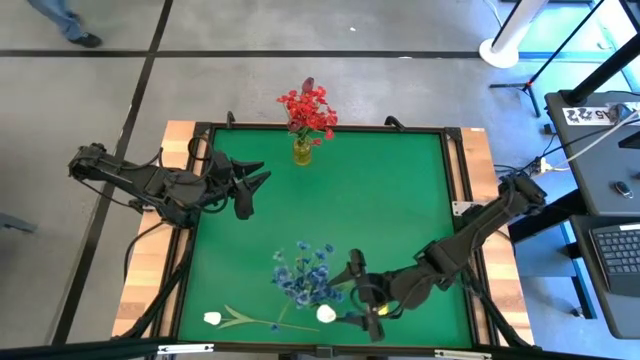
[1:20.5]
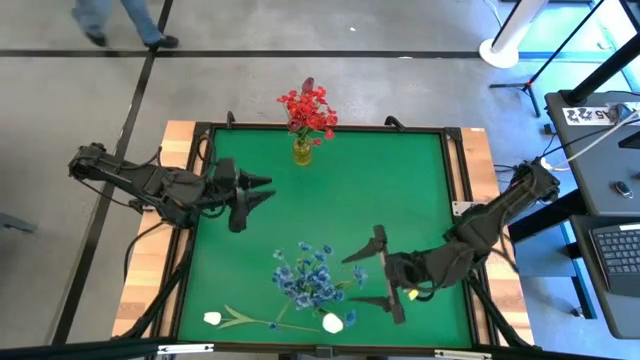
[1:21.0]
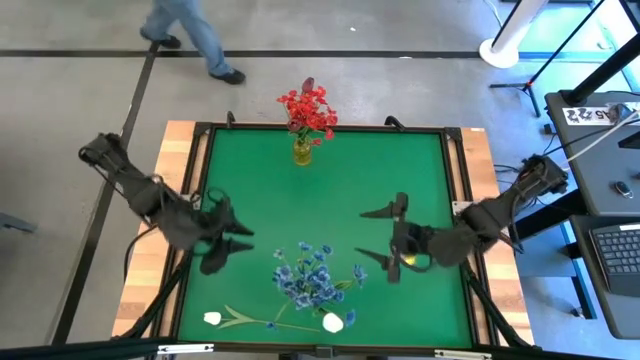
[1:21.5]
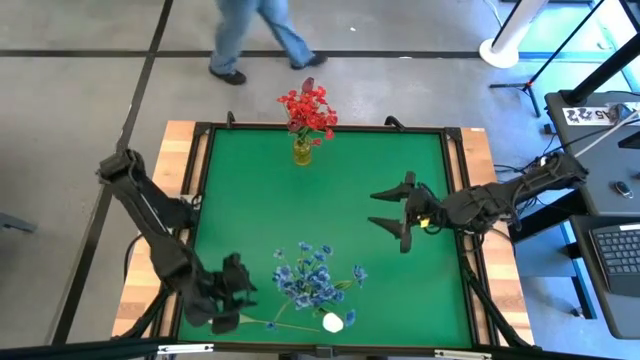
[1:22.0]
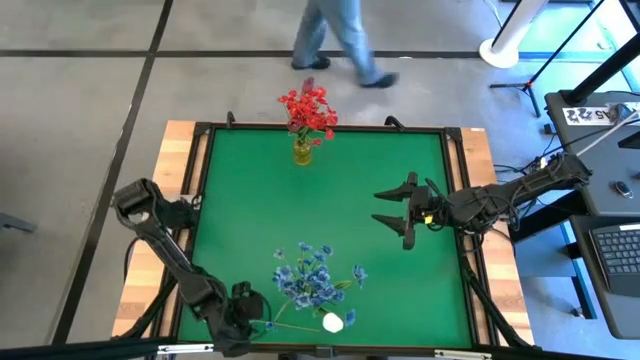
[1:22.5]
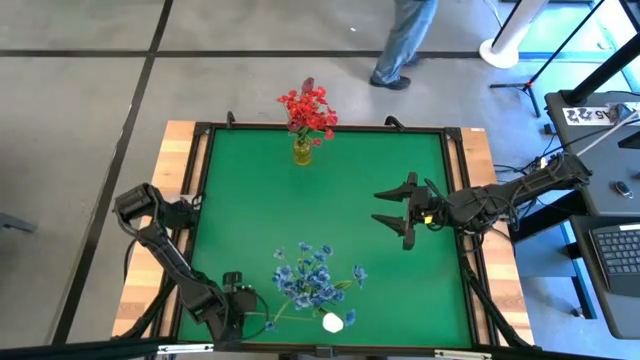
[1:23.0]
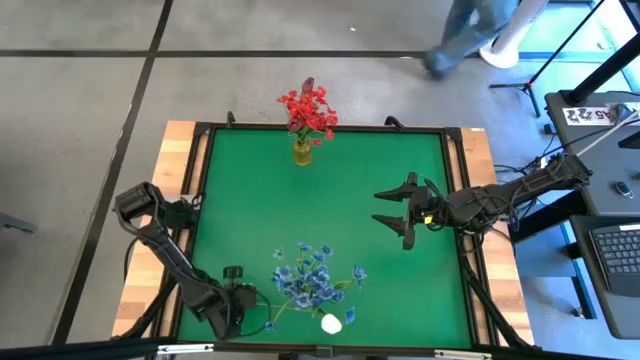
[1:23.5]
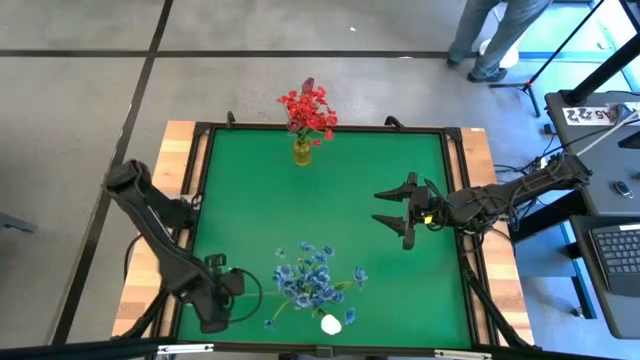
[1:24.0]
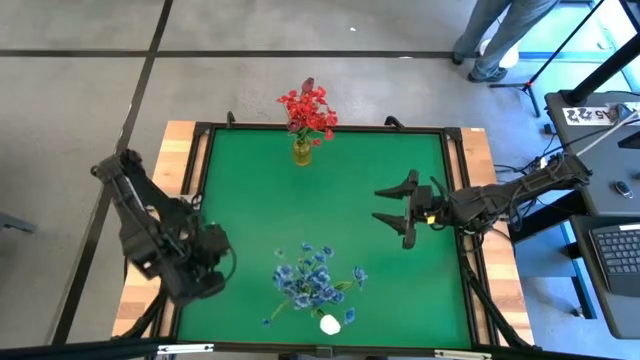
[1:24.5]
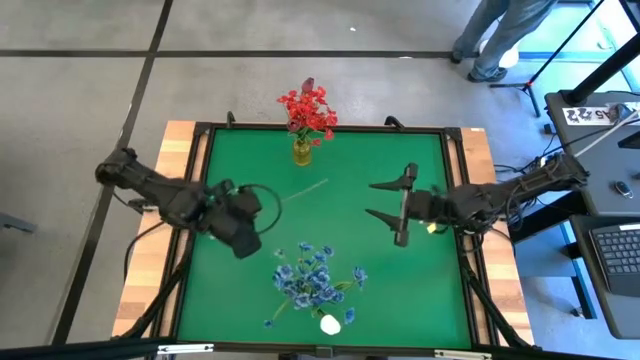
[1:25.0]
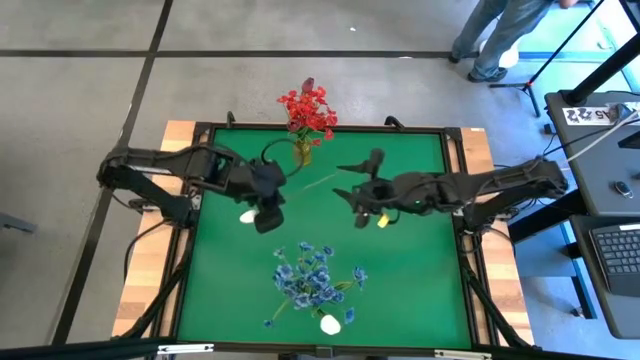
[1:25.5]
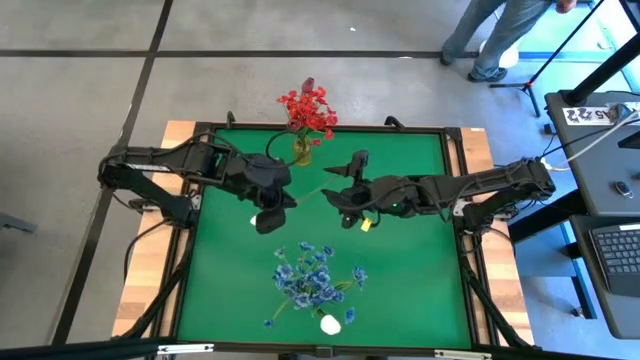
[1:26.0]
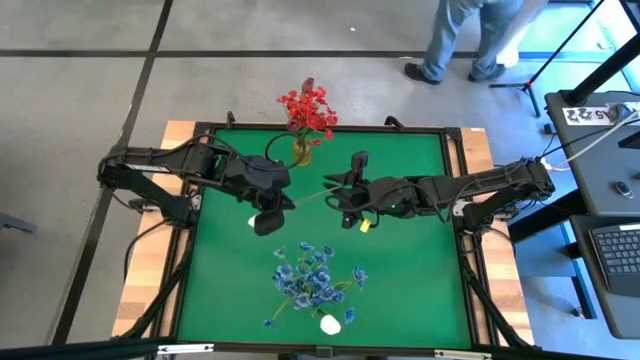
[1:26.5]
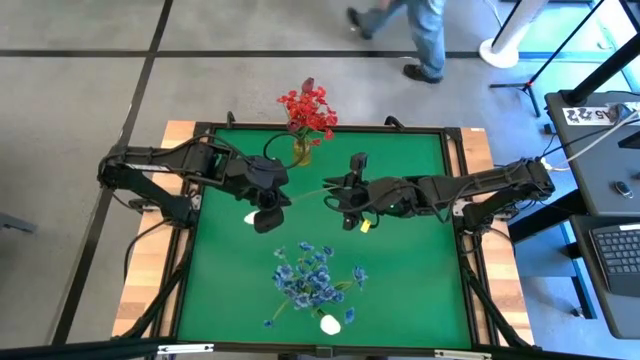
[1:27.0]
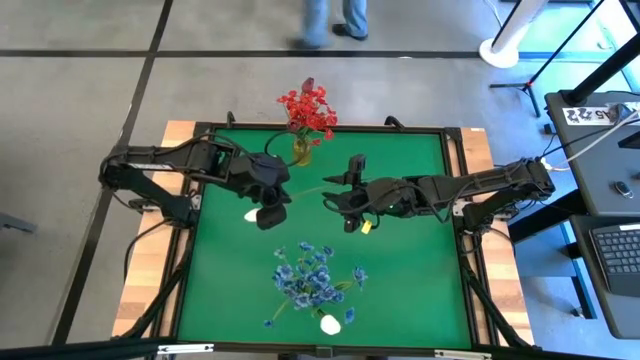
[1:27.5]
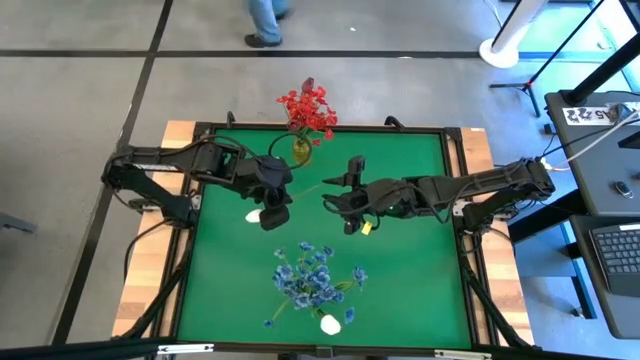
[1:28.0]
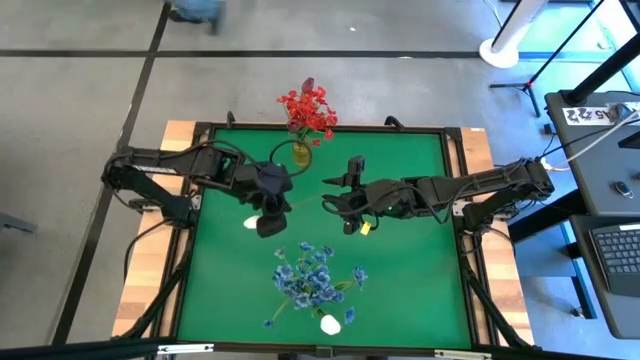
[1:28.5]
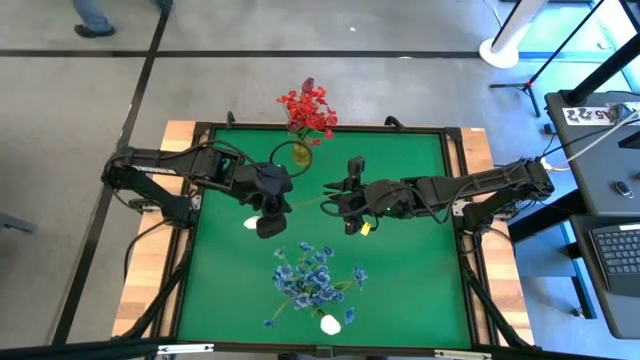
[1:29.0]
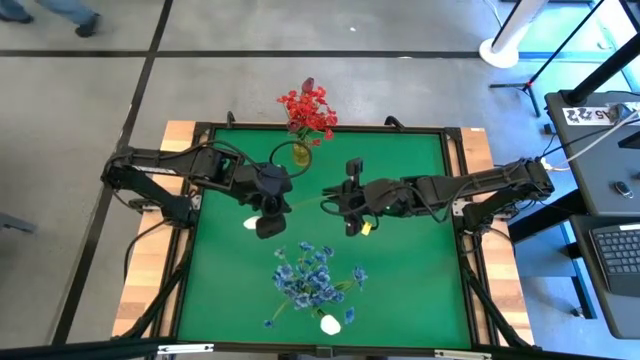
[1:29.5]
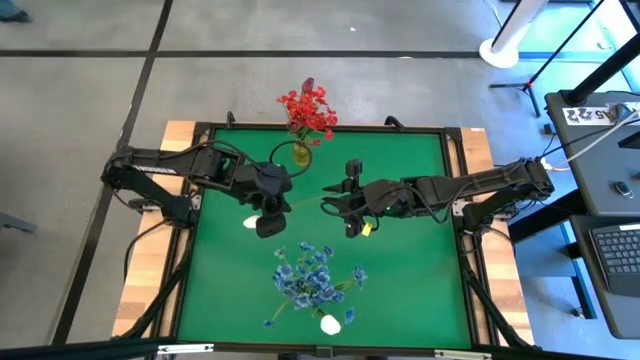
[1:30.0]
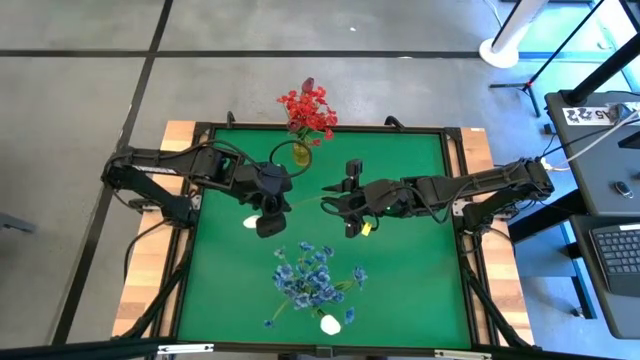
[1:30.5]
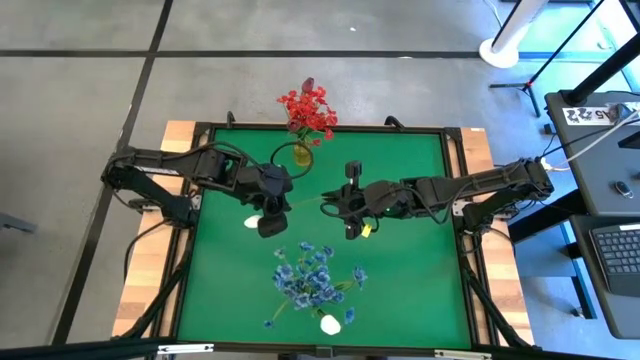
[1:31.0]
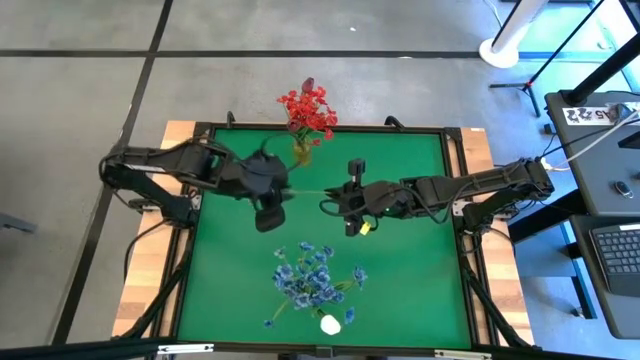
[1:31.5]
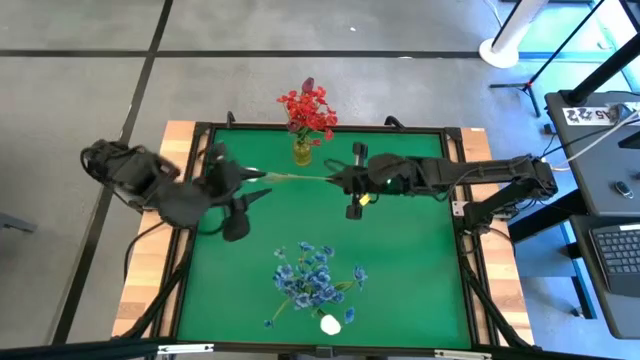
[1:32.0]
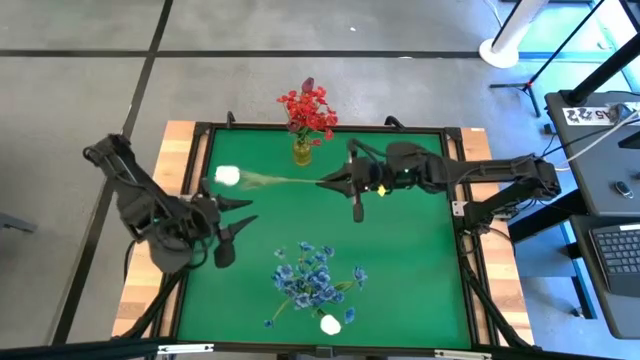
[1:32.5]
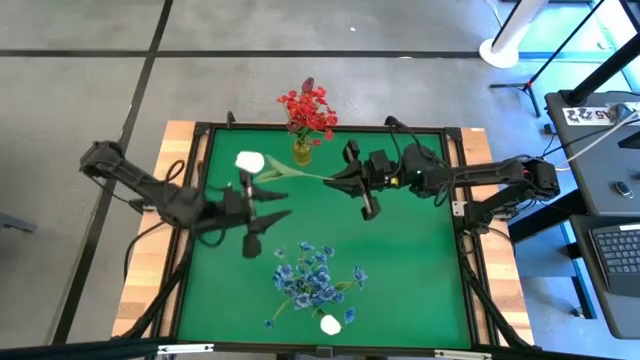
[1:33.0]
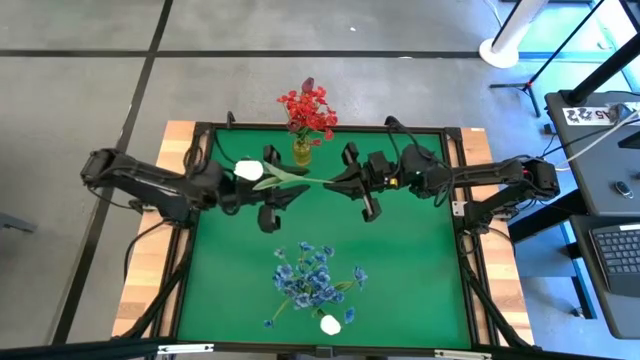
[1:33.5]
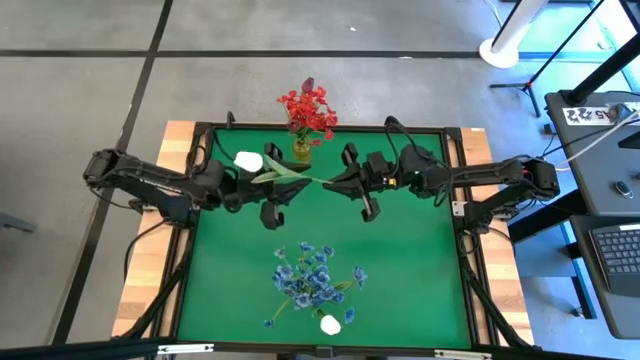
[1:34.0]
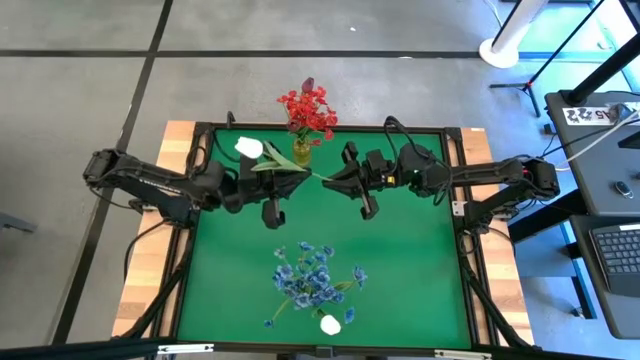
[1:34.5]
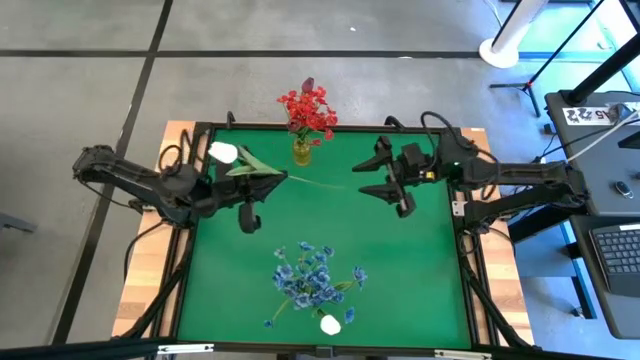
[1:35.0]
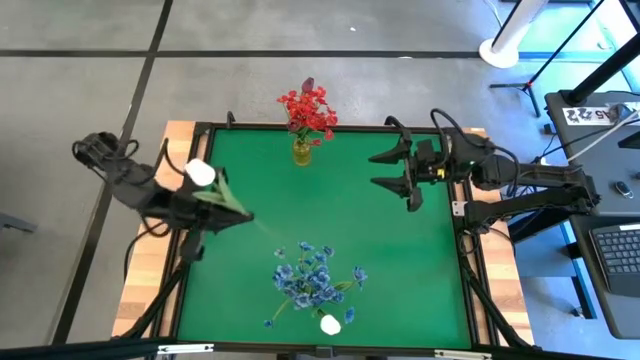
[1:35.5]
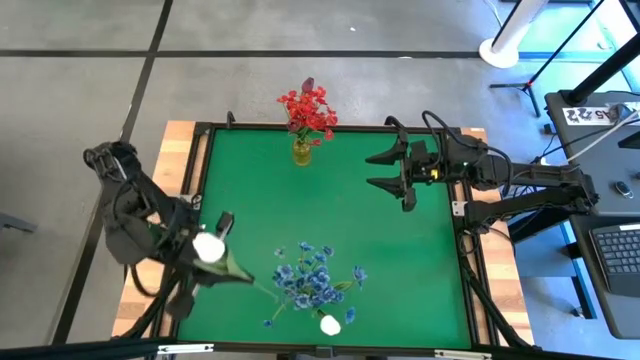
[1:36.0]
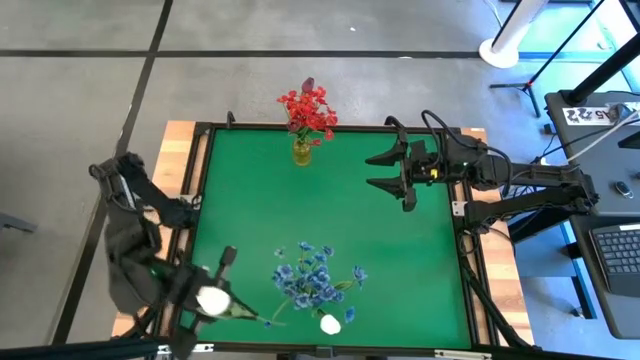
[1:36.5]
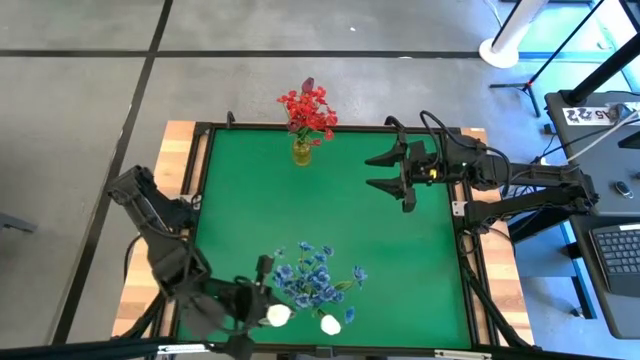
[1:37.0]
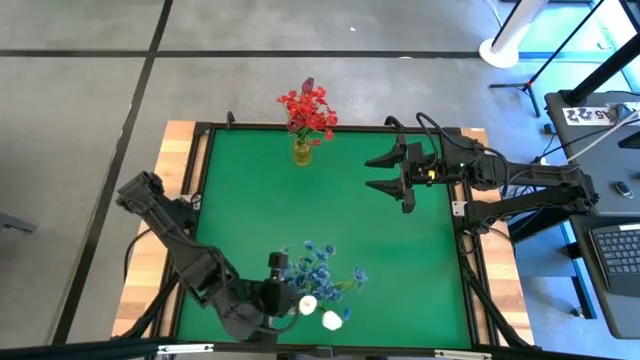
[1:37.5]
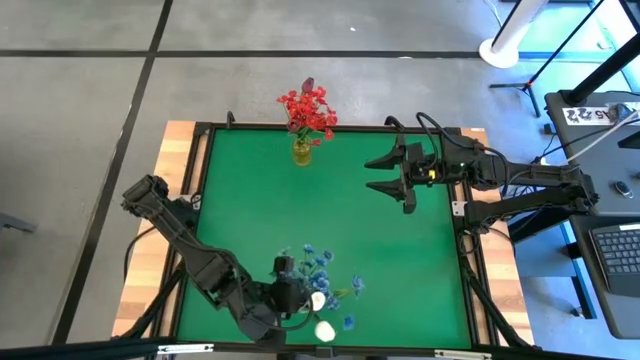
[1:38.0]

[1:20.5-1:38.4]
Task: Sort flowers into vase by color
Put the white tulip into the transparent vase

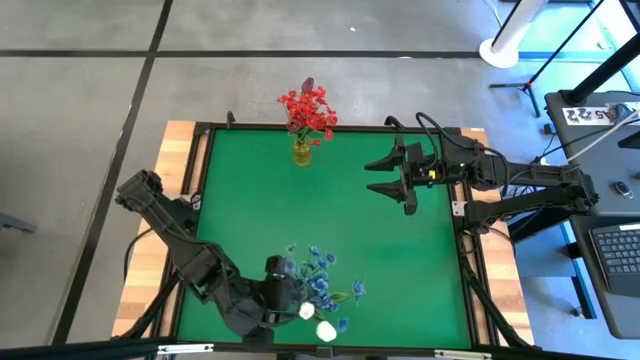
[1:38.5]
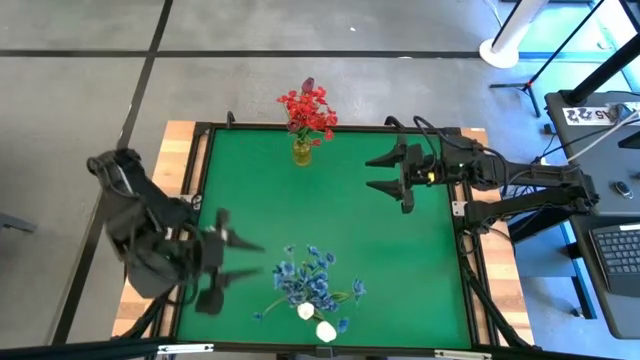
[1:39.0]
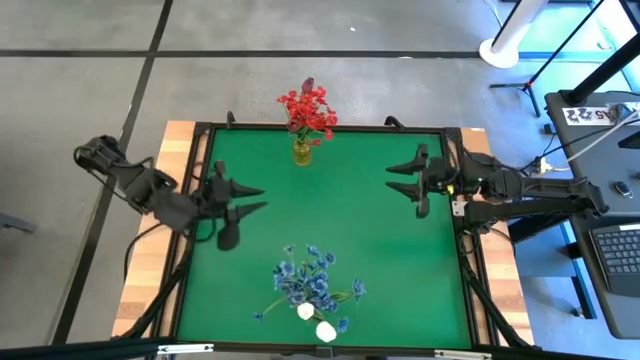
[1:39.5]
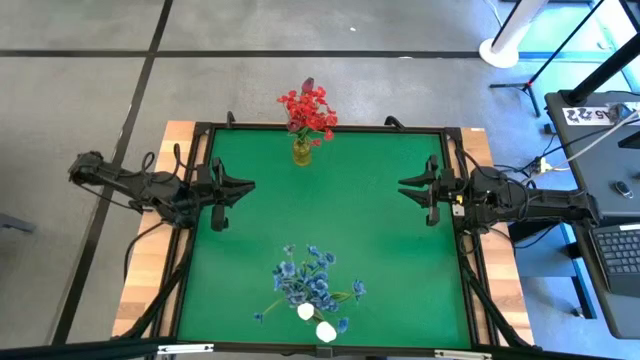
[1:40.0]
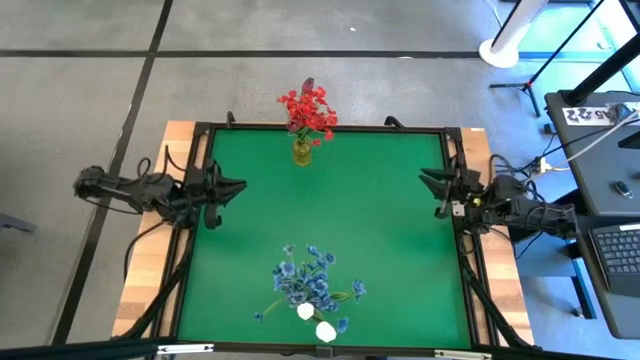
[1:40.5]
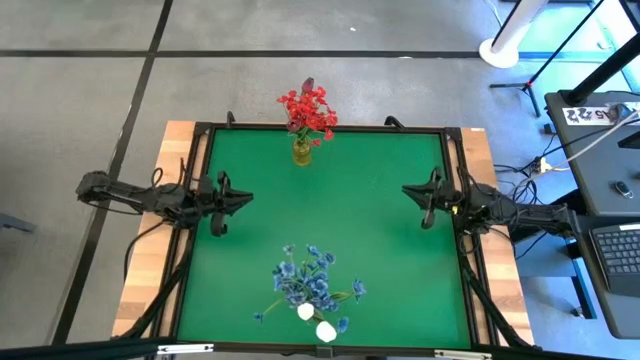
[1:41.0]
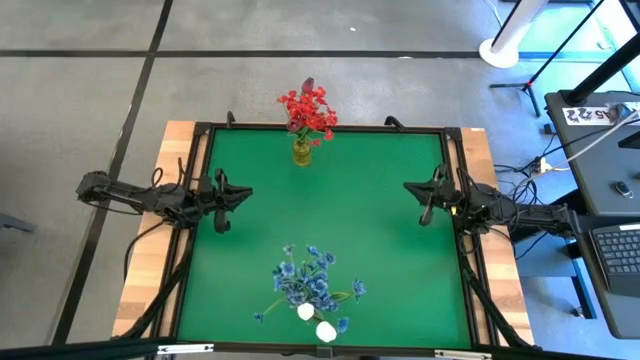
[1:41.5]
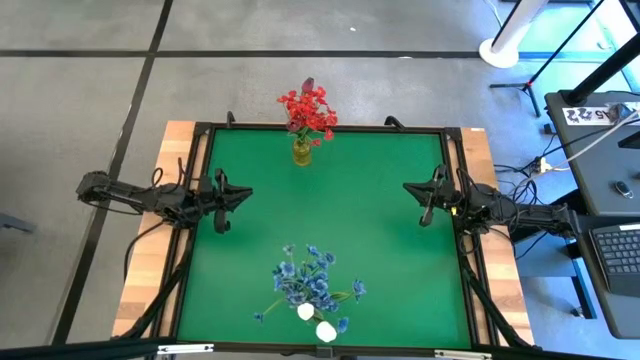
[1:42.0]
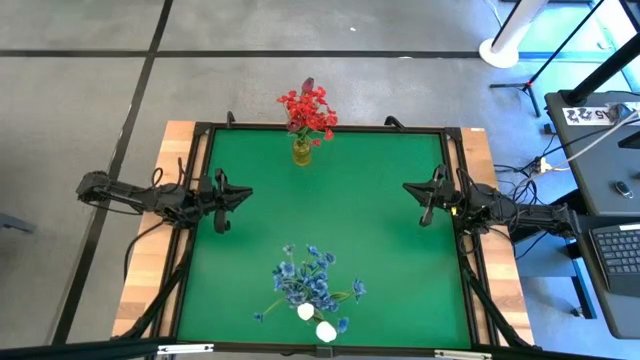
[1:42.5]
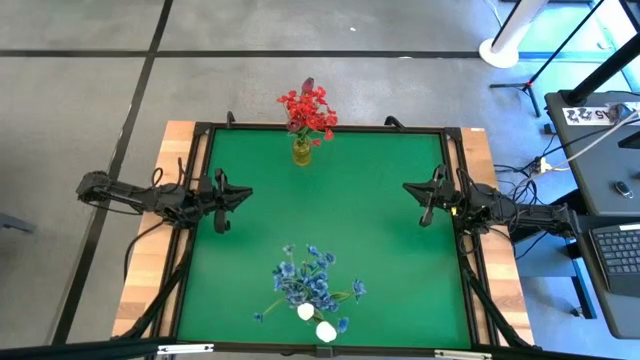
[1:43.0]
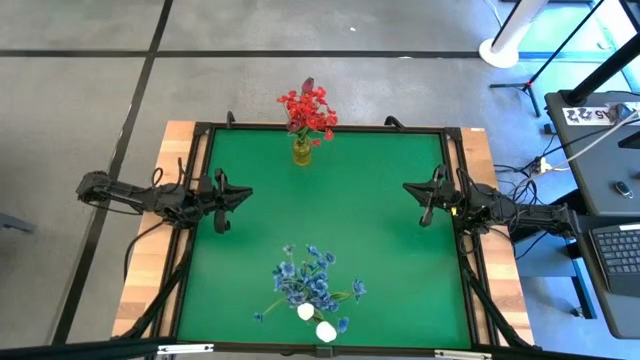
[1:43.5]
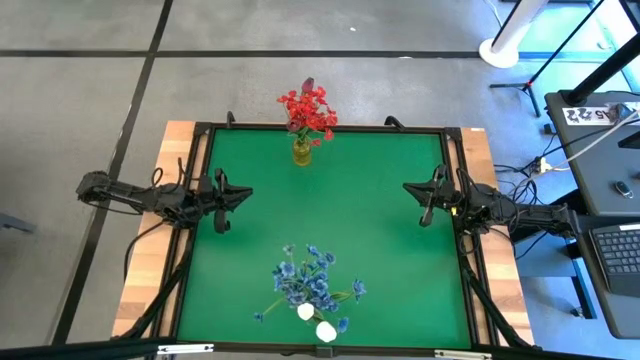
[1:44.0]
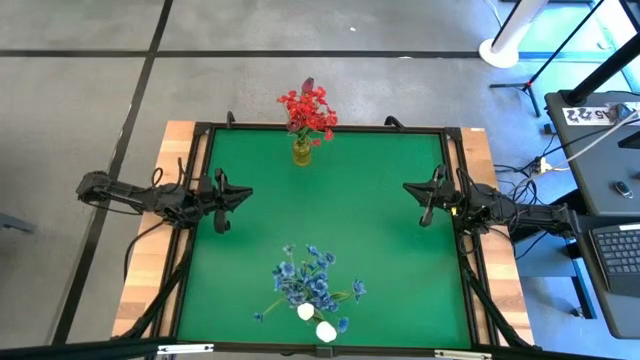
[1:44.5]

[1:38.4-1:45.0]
Return to Home Position
